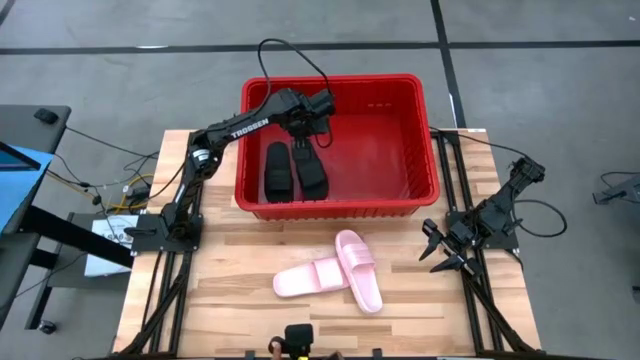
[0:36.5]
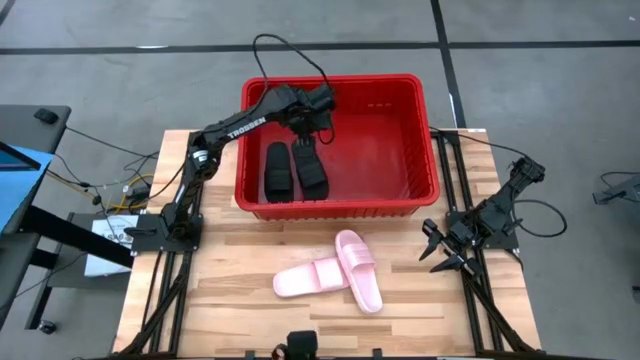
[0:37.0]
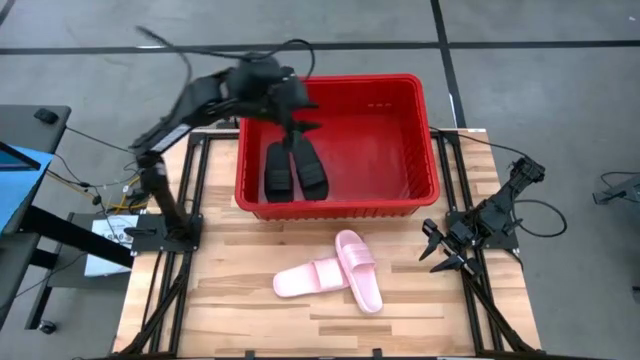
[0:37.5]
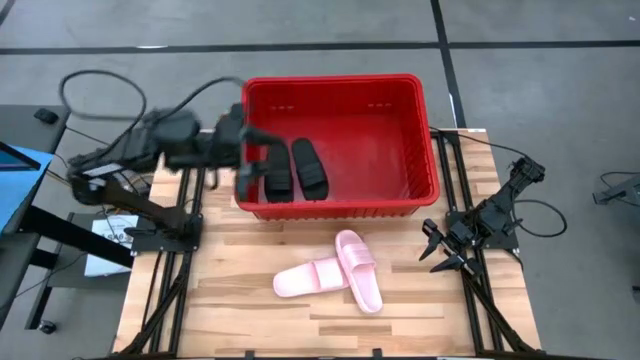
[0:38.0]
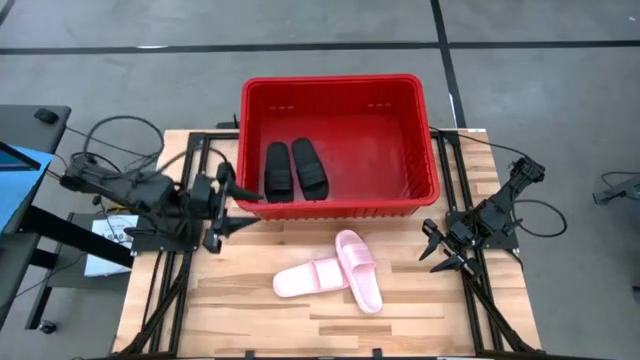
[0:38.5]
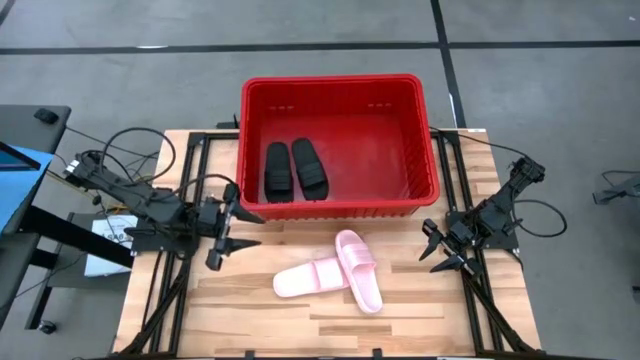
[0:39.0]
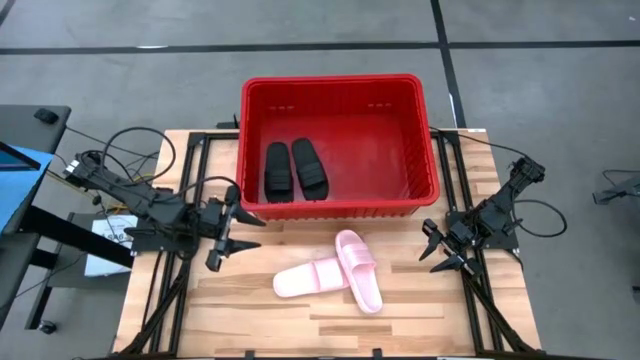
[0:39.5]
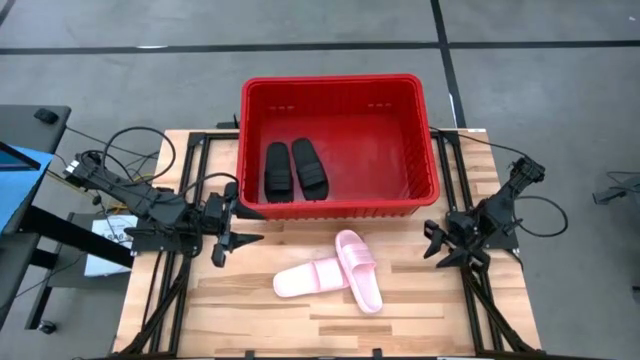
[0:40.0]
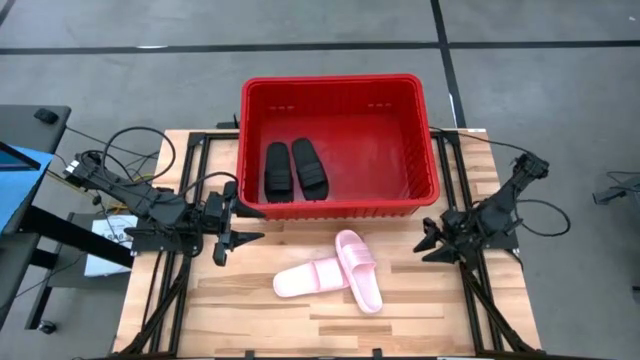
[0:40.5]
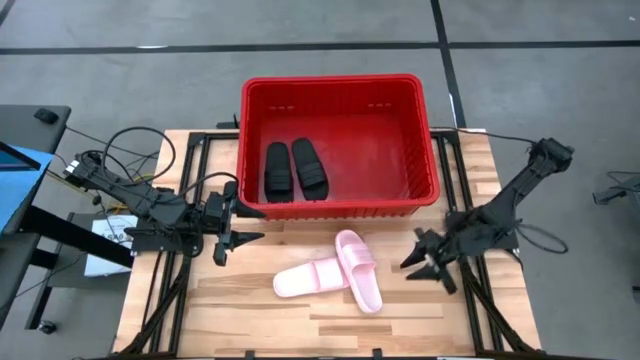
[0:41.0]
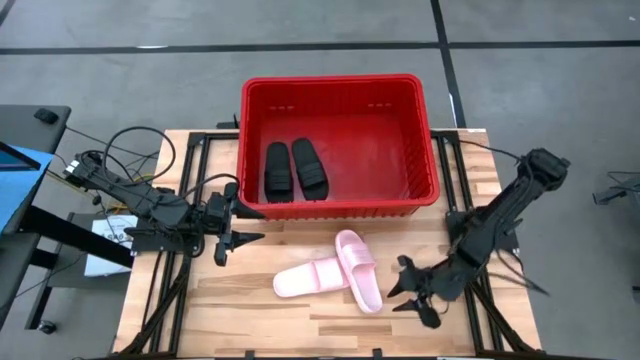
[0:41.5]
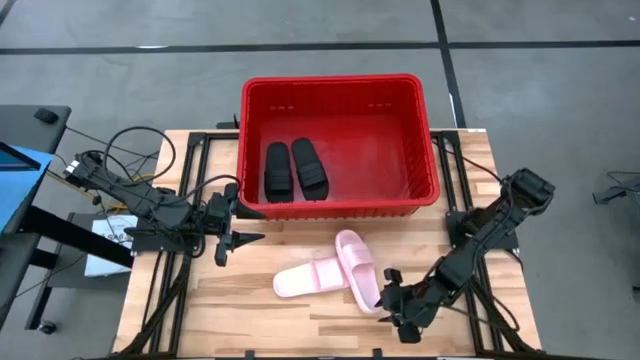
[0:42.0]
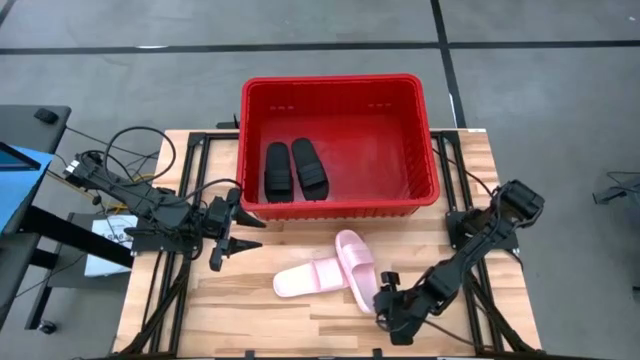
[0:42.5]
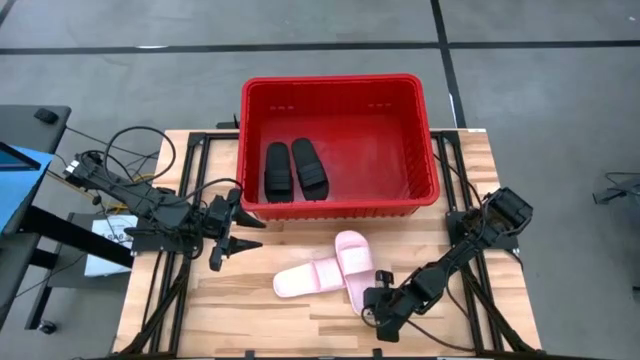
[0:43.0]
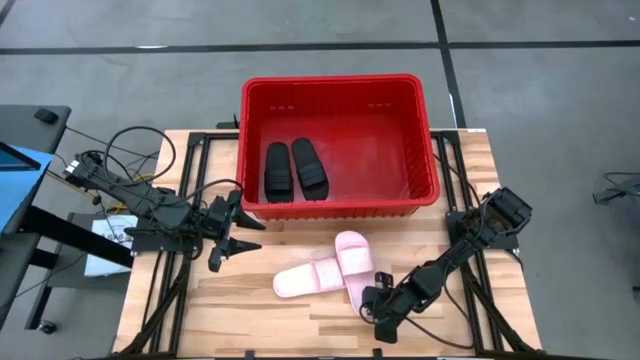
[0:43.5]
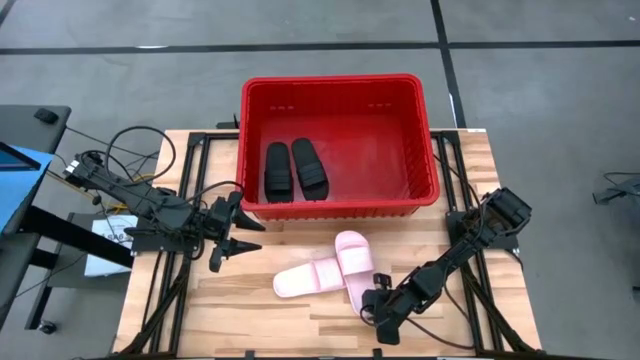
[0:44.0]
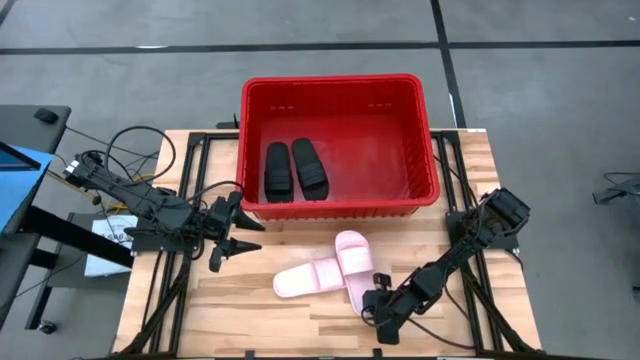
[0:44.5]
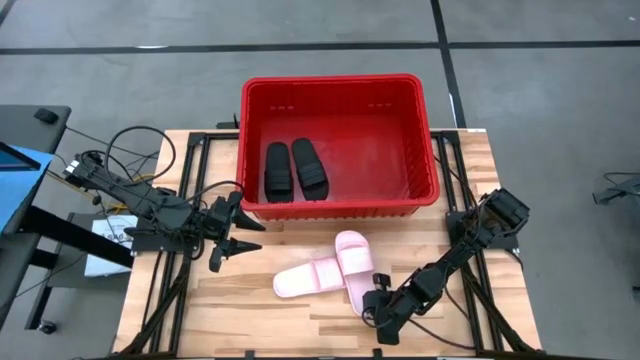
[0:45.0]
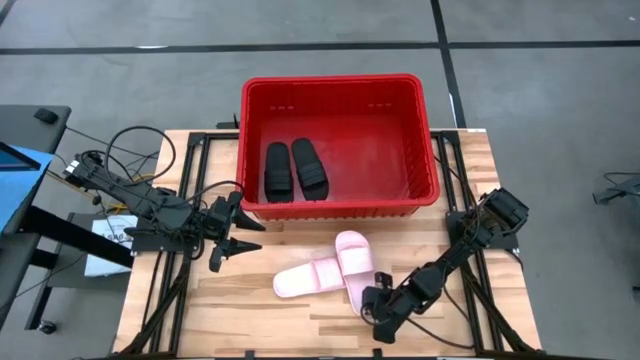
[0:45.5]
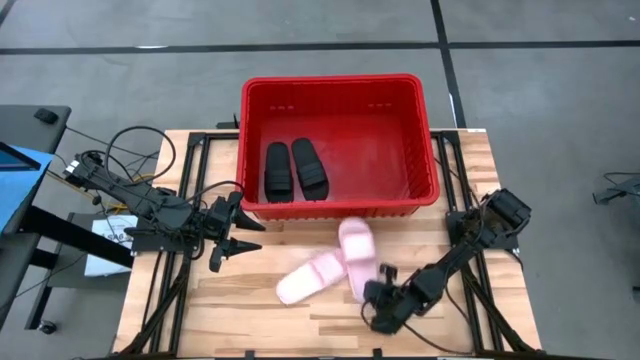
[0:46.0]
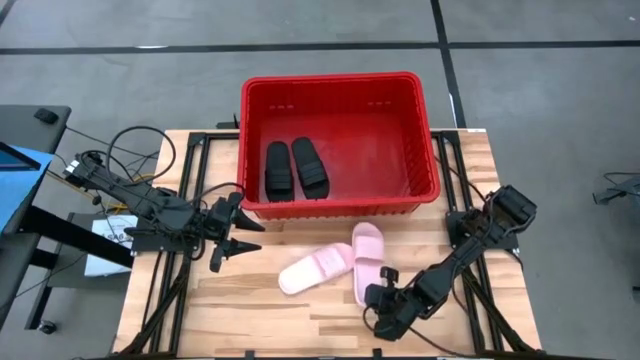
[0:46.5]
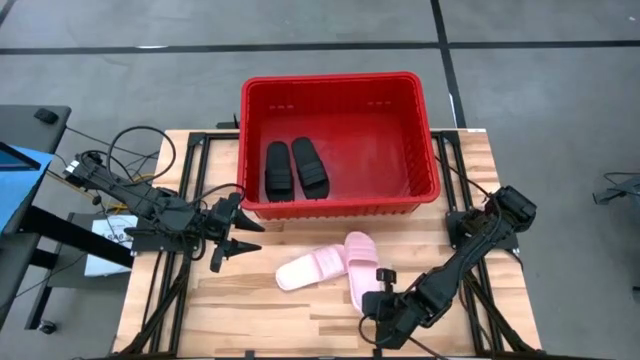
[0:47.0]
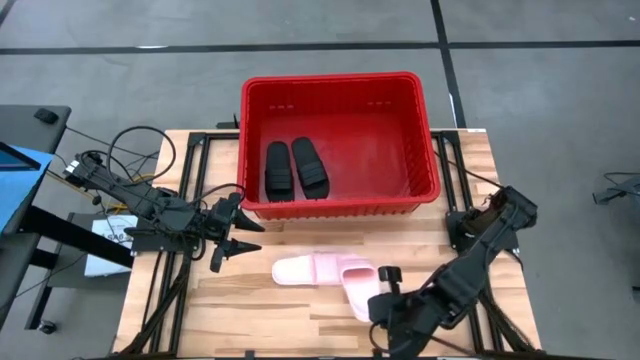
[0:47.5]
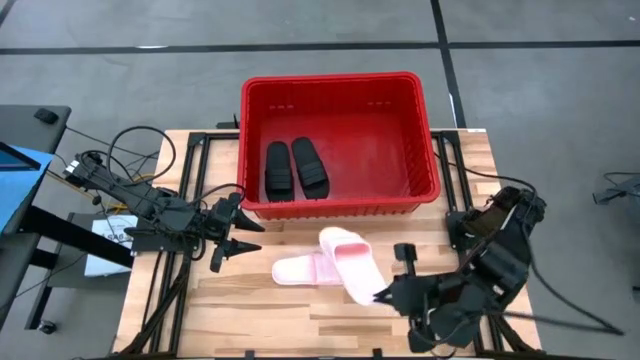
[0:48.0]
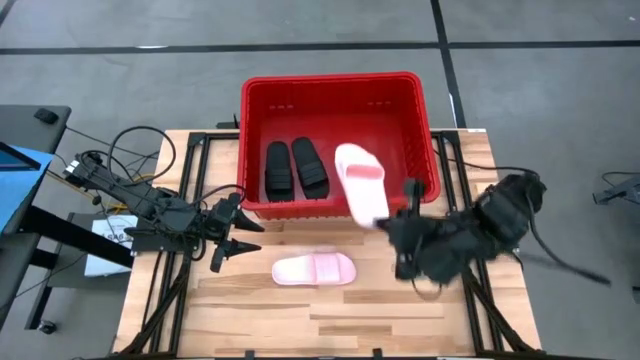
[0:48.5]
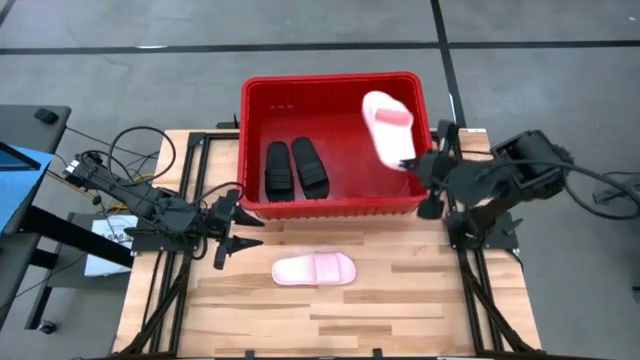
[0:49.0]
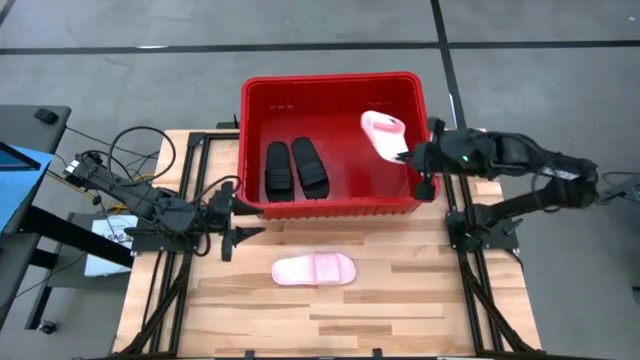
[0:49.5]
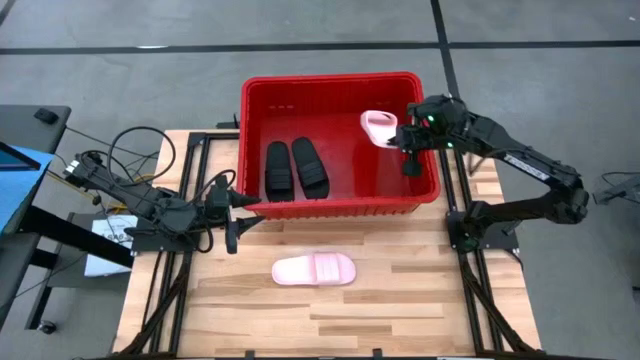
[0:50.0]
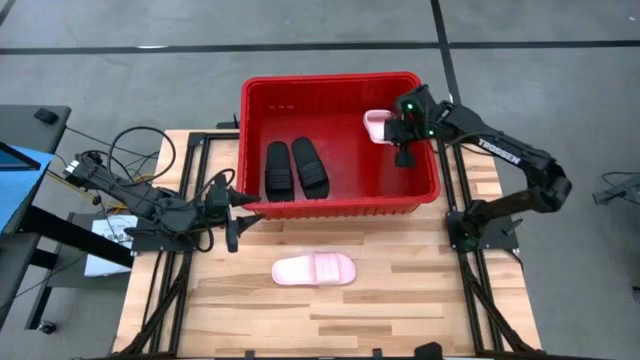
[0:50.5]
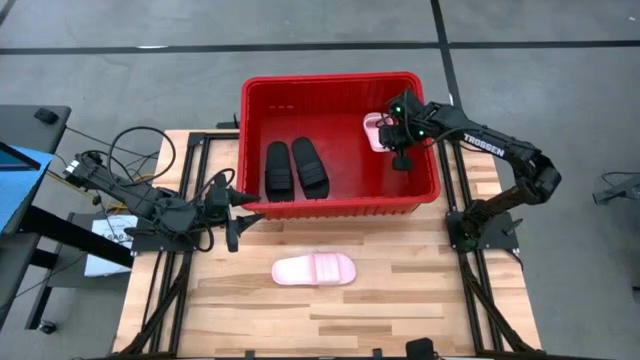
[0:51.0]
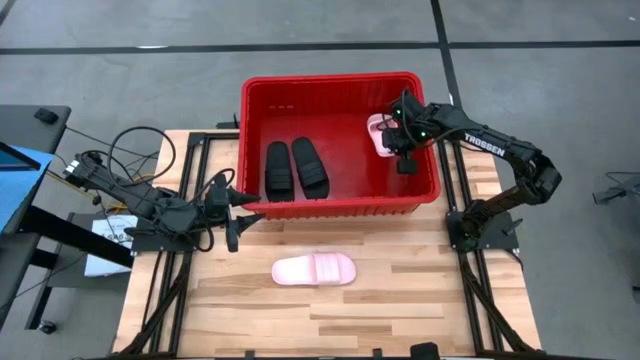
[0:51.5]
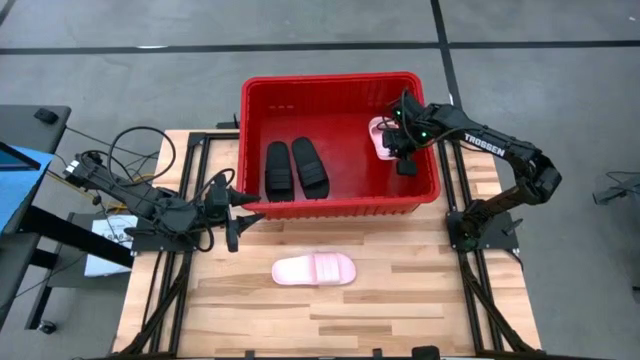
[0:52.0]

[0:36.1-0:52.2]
Task: Pick and place slides into bin
Put the right pink slide into the red container

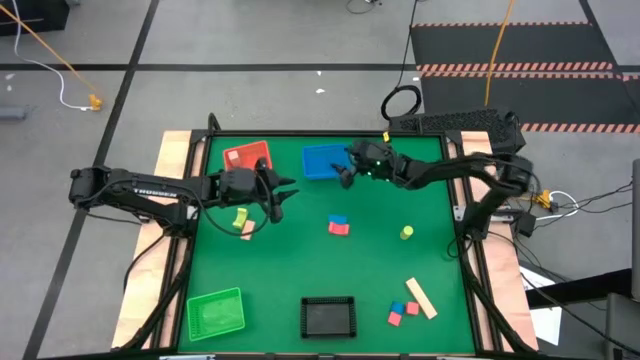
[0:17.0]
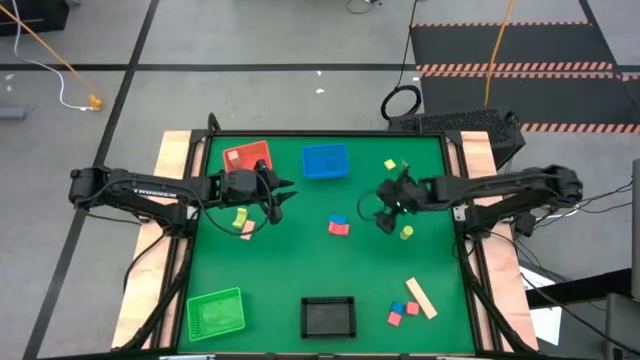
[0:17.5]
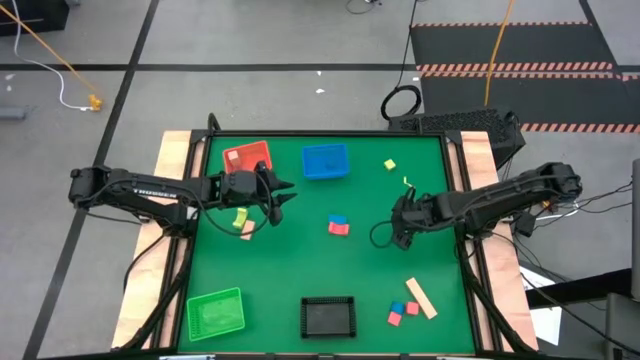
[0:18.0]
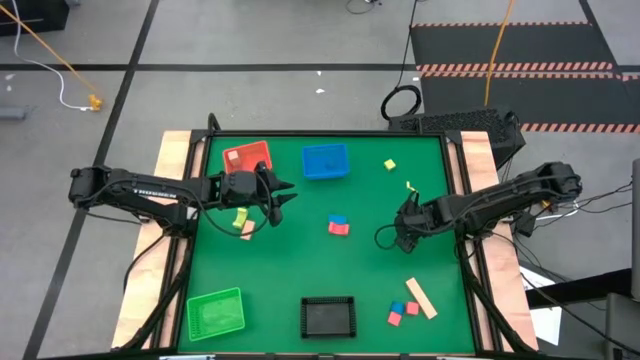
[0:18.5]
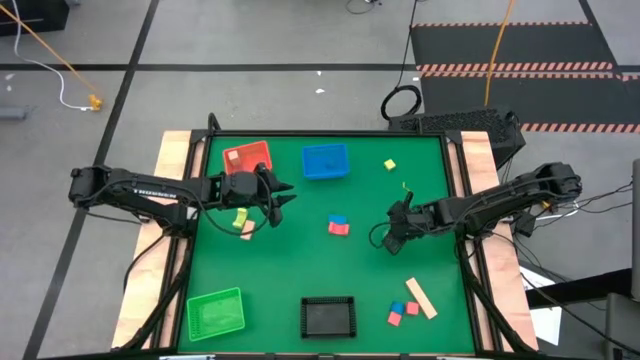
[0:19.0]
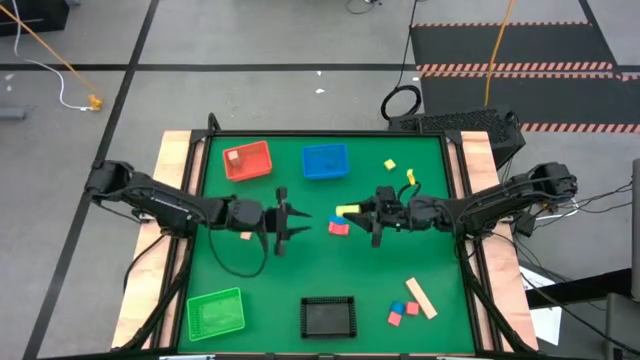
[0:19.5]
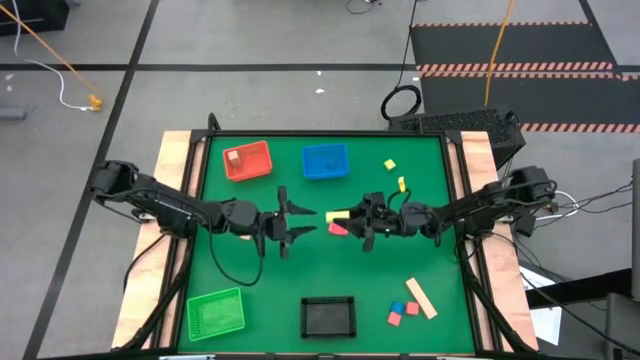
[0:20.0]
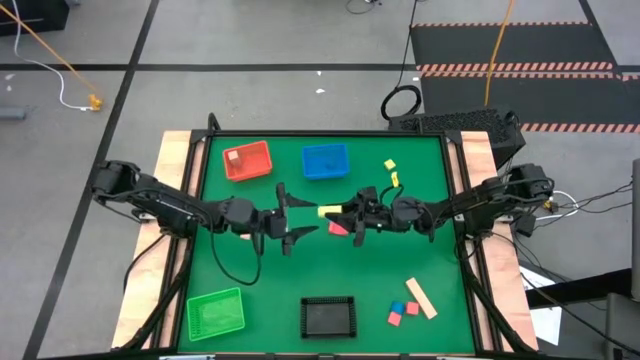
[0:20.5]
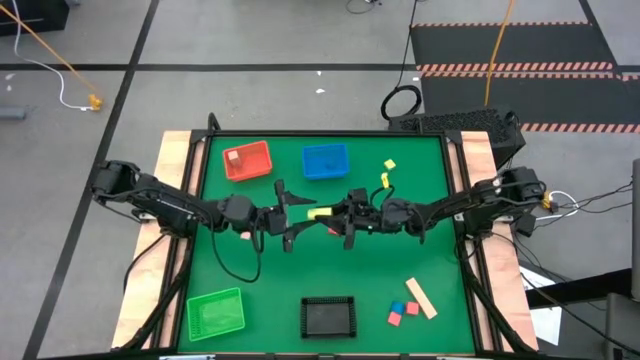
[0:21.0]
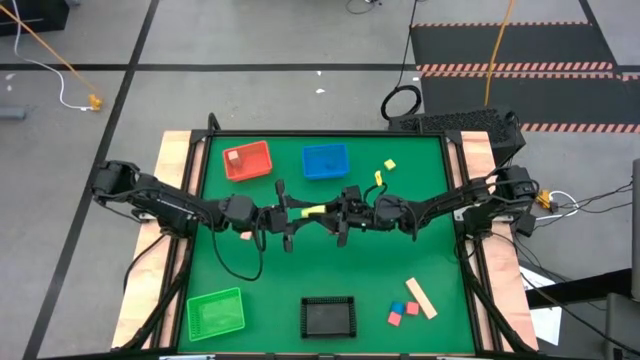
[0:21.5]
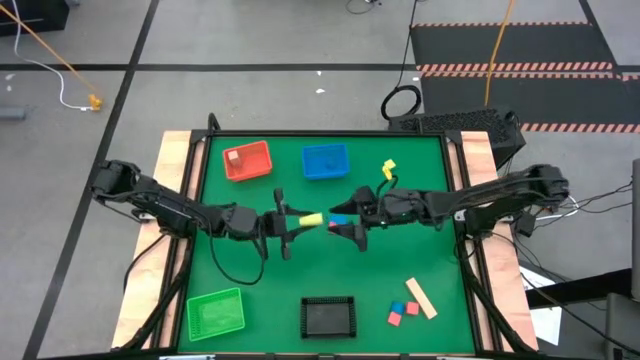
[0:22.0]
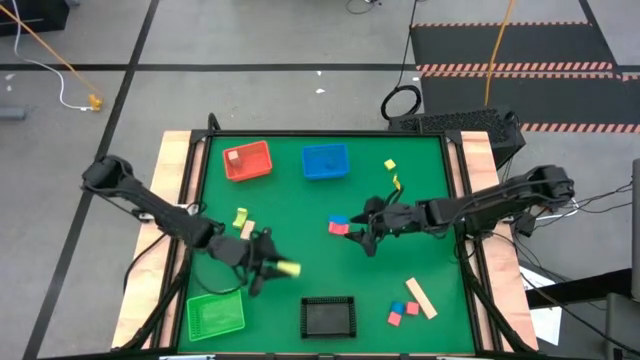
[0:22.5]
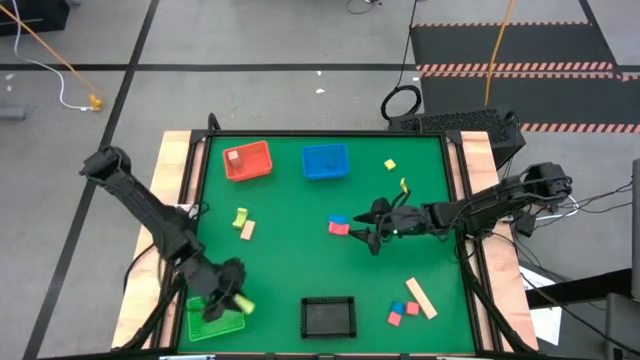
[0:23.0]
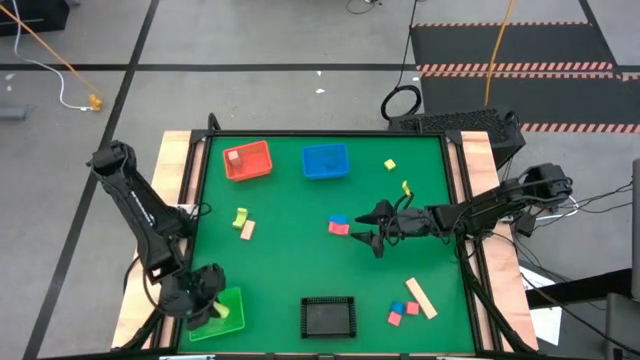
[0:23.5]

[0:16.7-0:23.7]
Task: Sort & place blocks by color
Put the bottom right green block into the green bin
